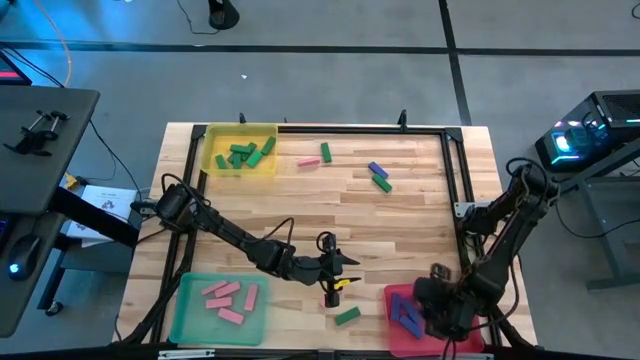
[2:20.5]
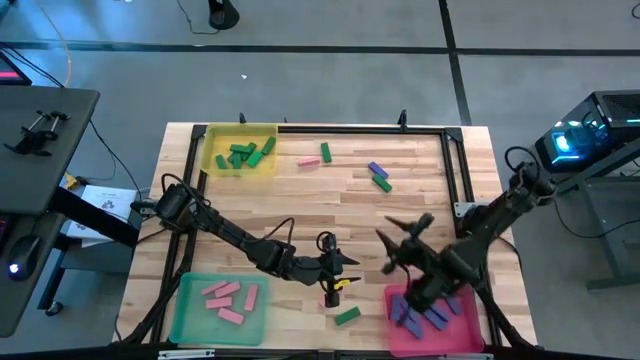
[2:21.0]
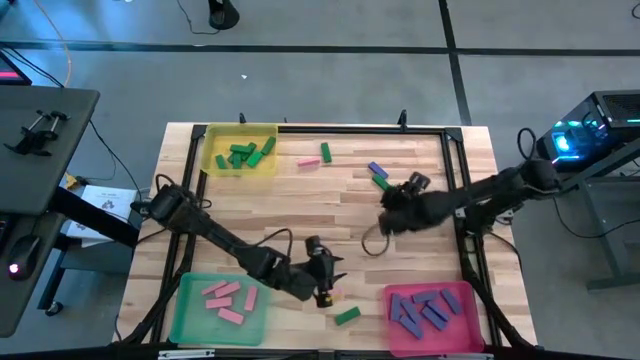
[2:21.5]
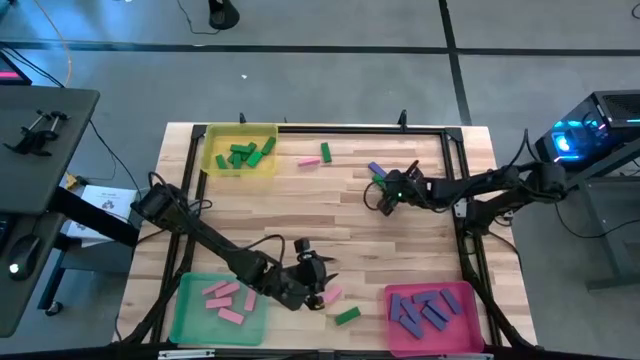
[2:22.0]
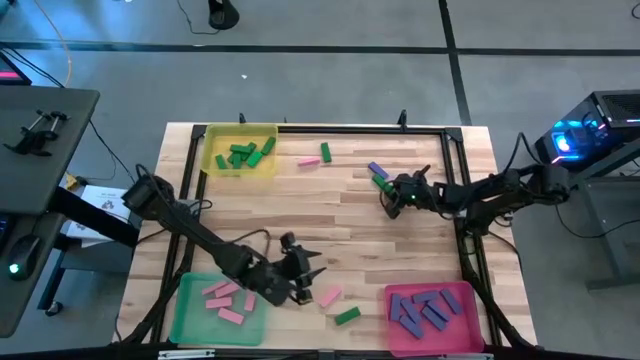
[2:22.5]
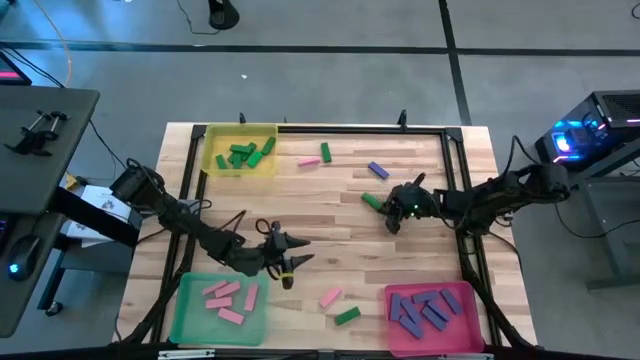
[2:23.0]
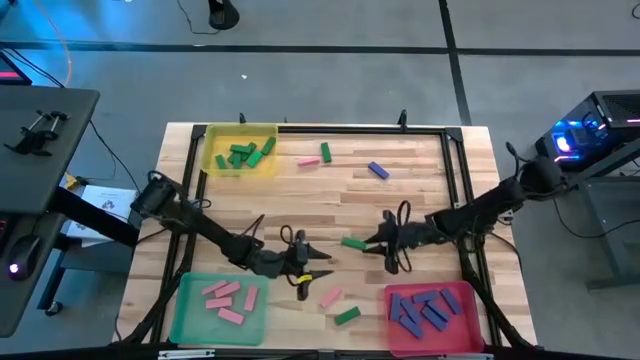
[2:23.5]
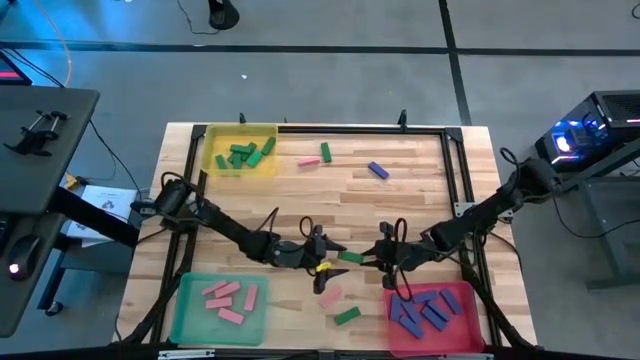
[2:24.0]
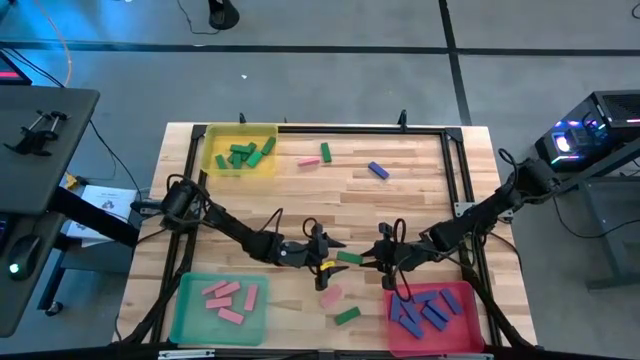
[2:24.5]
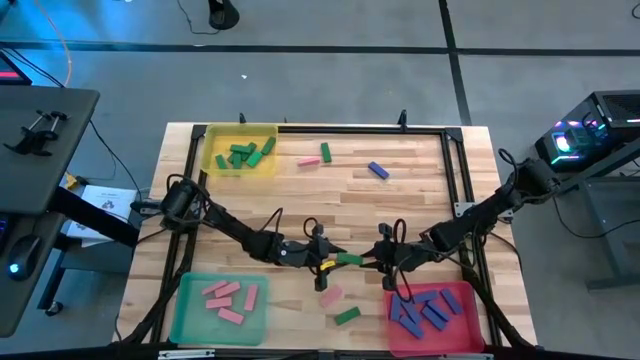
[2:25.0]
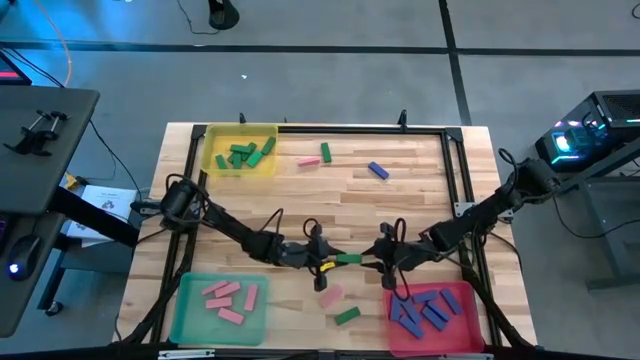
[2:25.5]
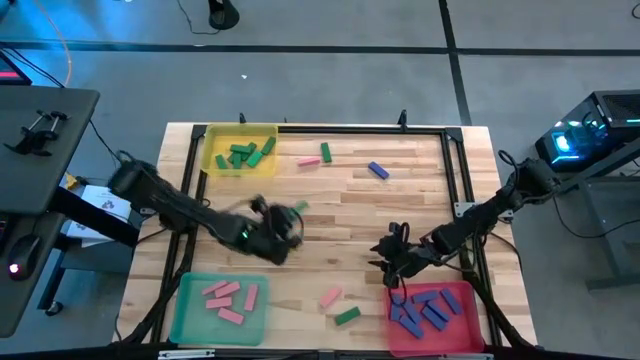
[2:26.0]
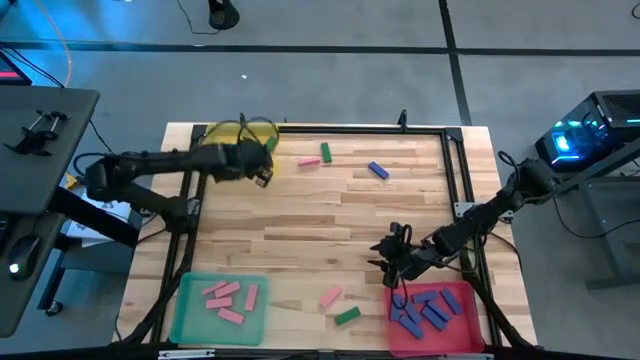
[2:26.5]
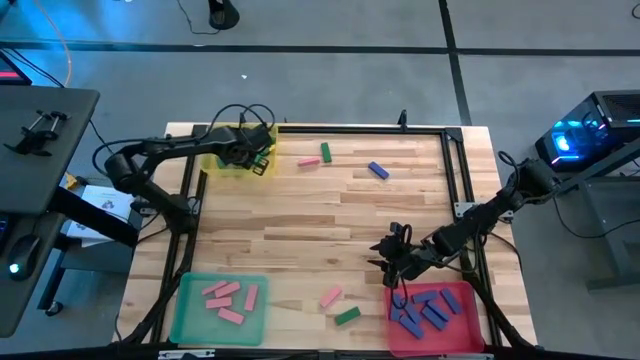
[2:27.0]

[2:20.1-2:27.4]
Task: Sort blocks
Put the green block into the yellow bin

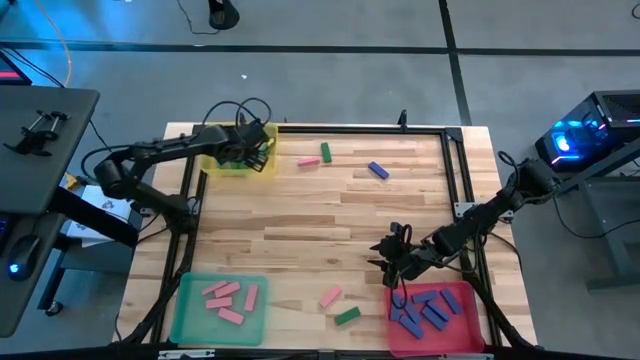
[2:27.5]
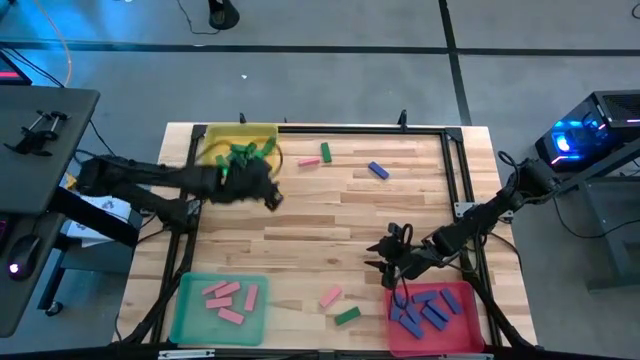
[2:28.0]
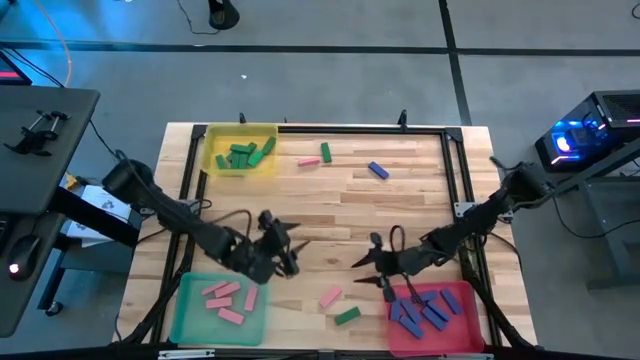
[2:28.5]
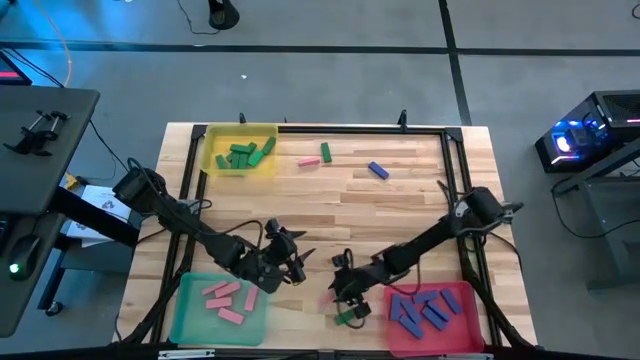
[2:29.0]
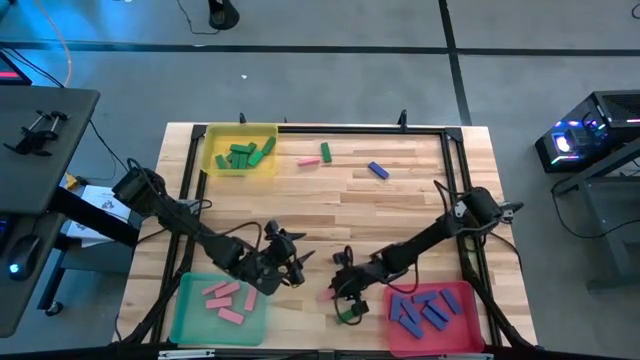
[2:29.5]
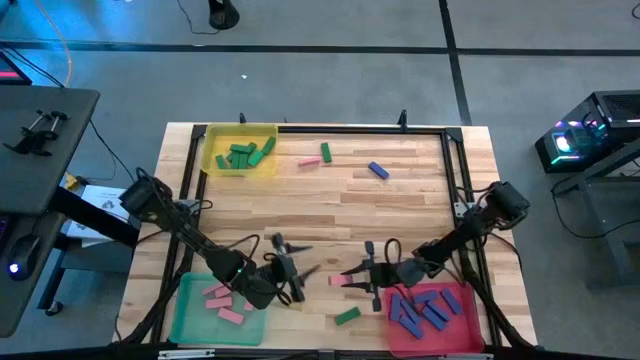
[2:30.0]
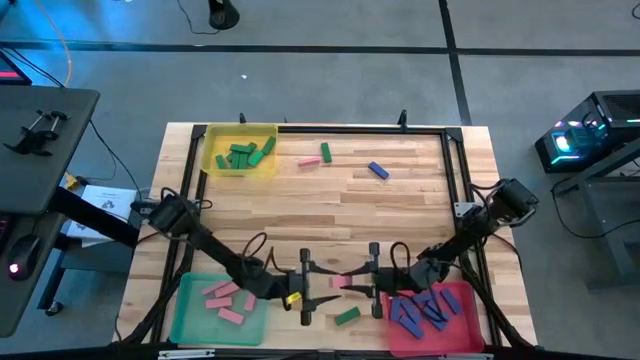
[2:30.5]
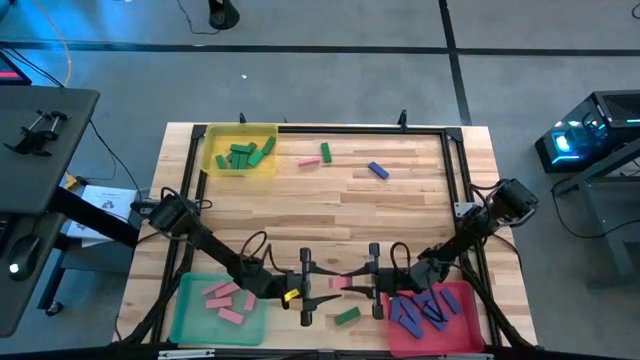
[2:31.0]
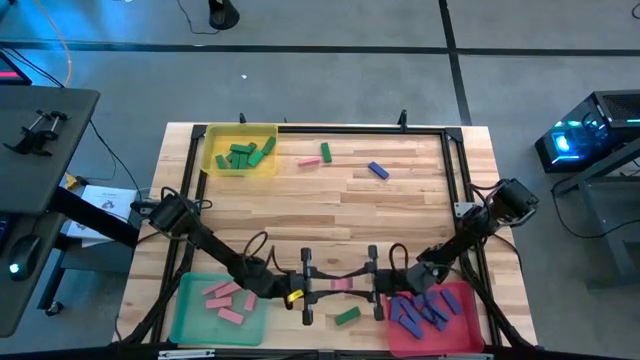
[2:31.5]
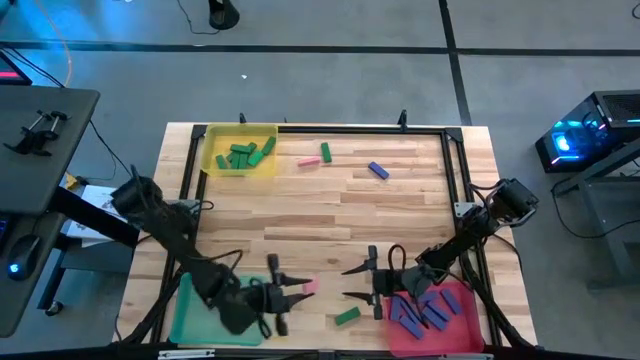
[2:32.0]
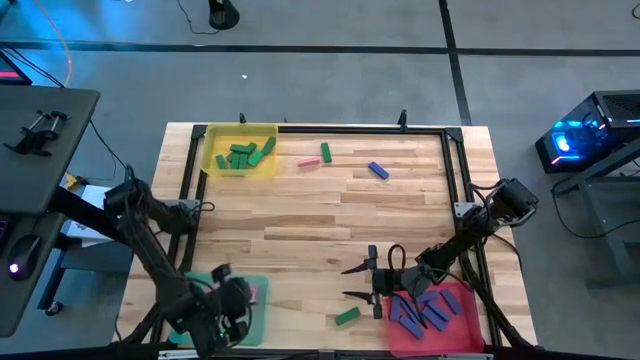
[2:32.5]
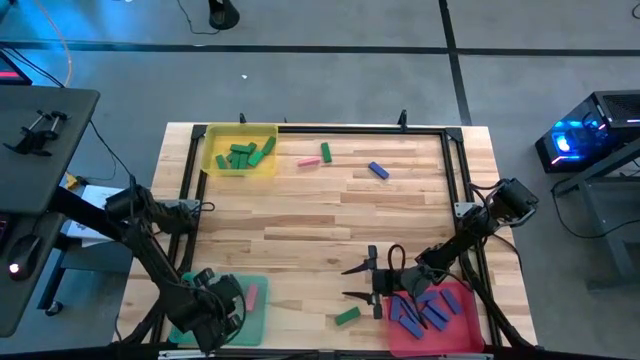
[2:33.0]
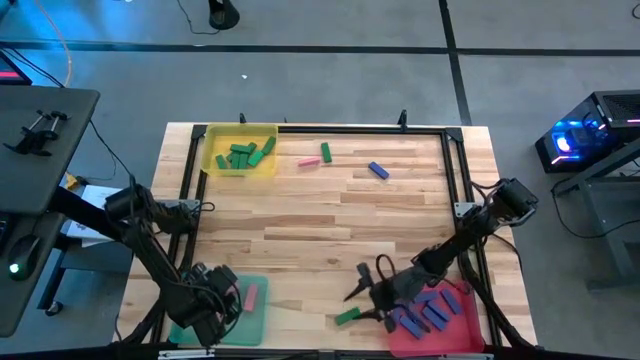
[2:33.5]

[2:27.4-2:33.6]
Put the pink block into the green bin

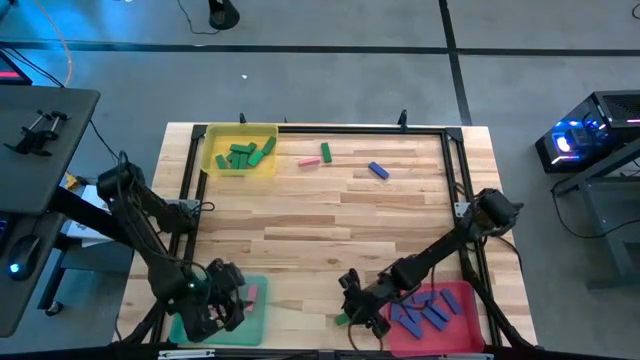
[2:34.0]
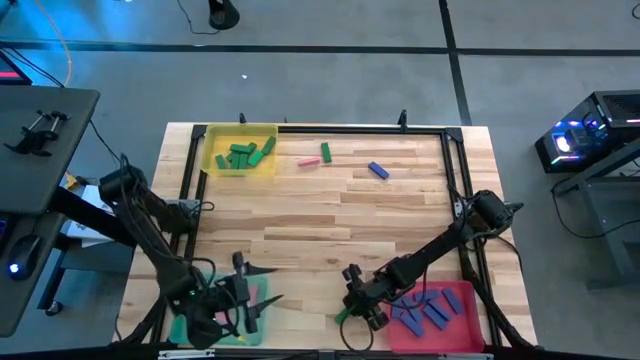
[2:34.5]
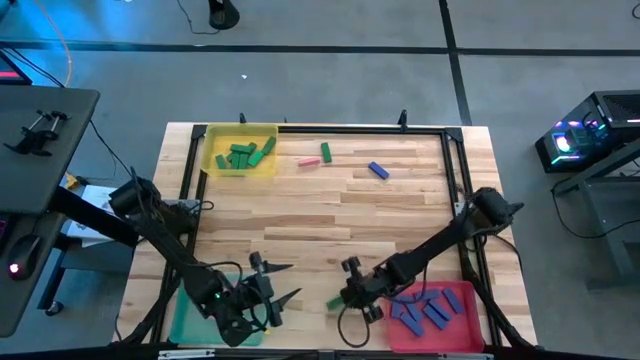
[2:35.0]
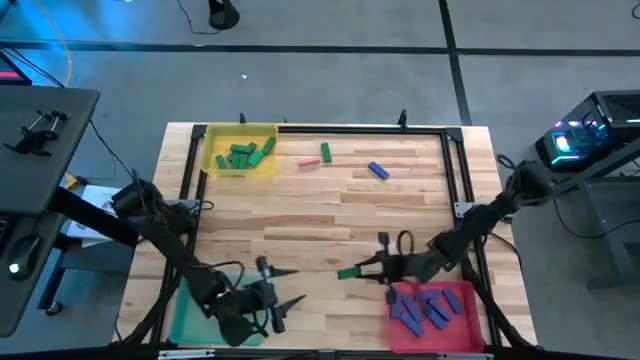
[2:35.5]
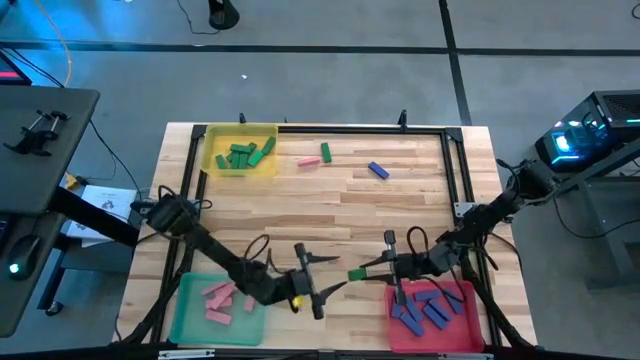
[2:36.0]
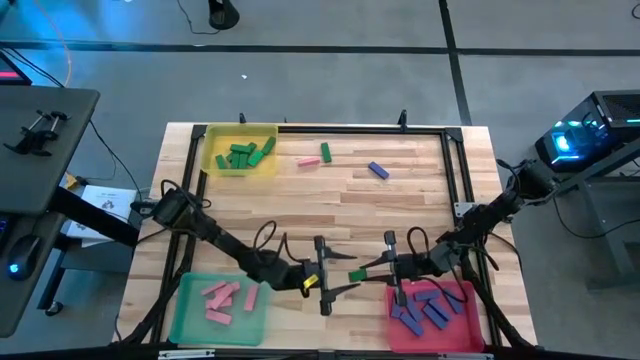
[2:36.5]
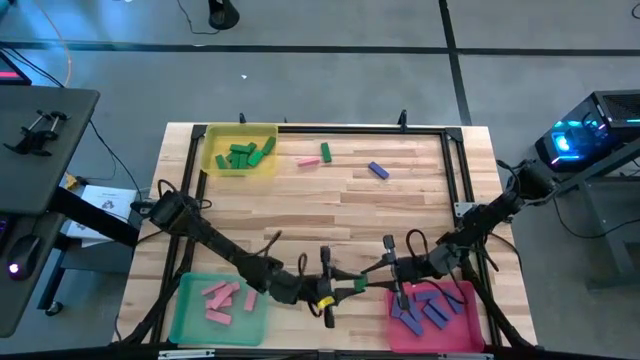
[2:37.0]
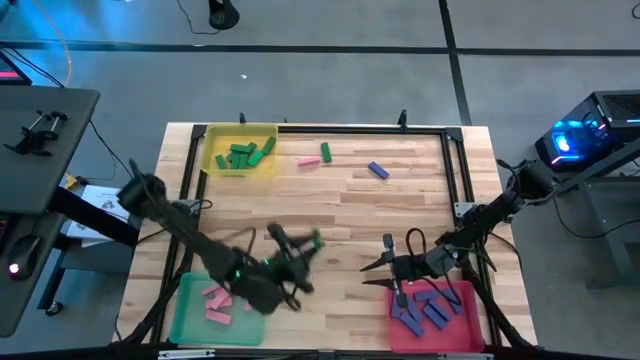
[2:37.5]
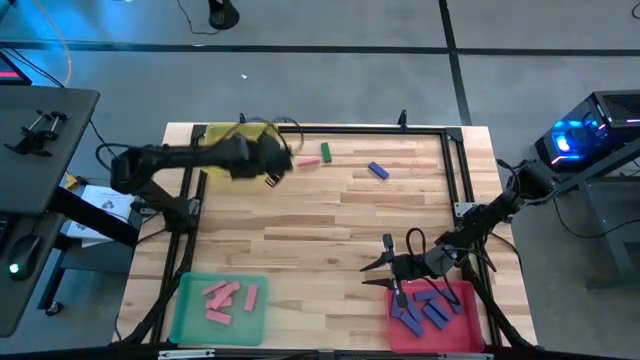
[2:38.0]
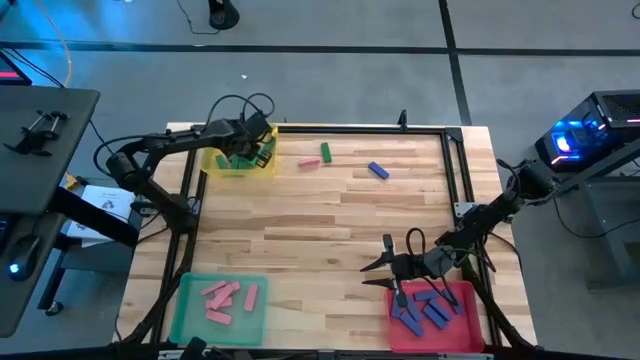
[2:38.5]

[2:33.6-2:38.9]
Put the green block into the yellow bin

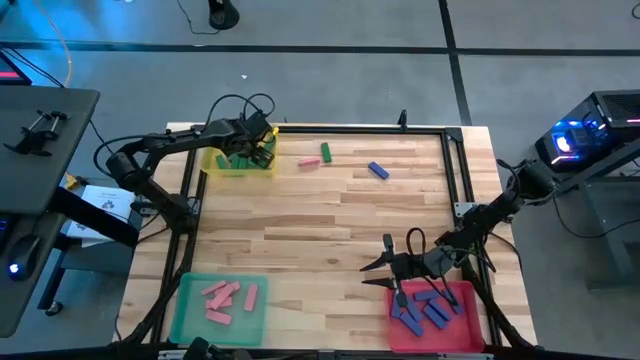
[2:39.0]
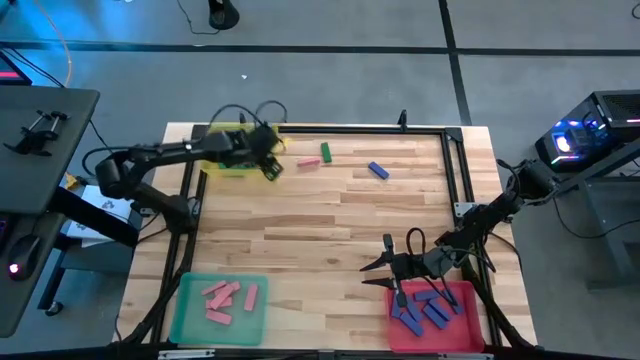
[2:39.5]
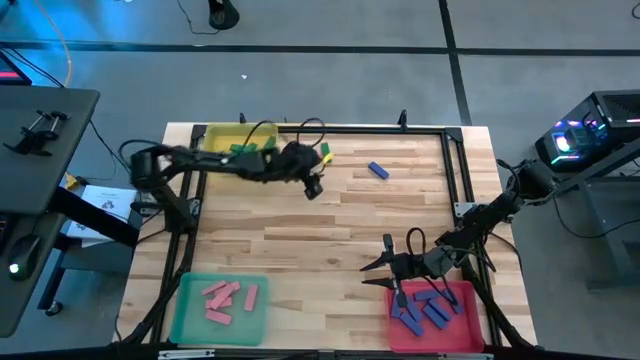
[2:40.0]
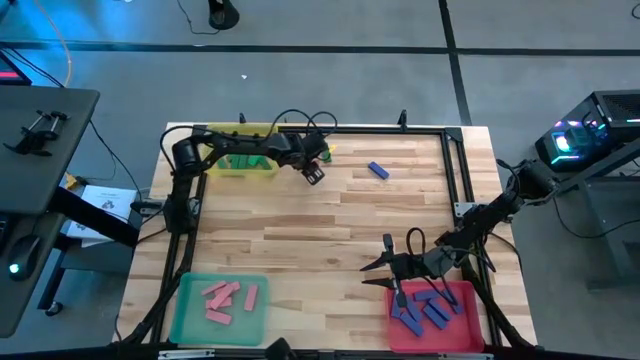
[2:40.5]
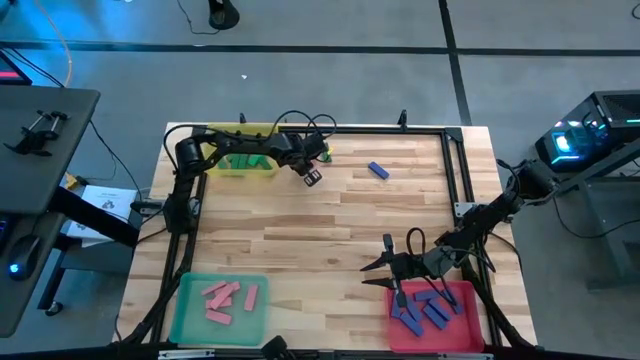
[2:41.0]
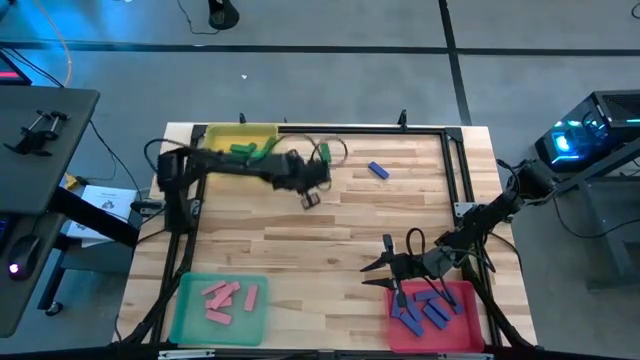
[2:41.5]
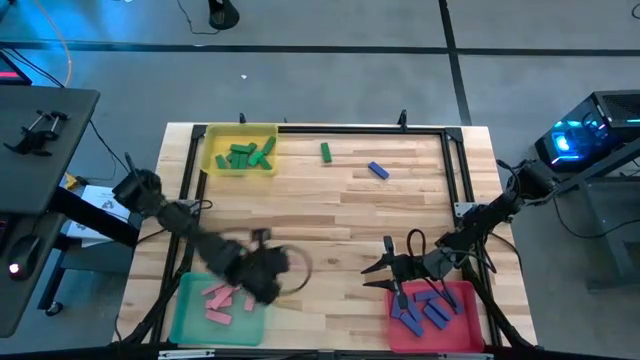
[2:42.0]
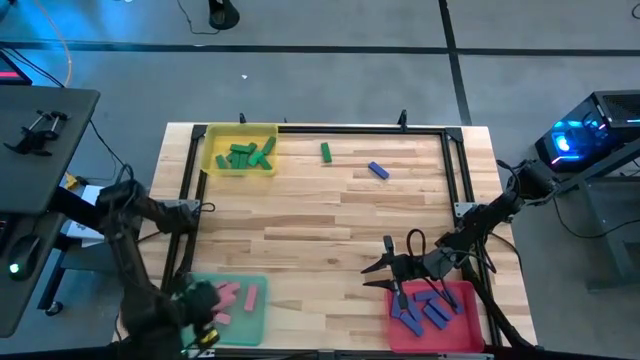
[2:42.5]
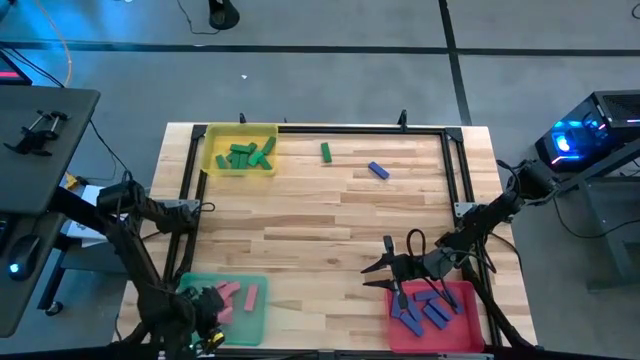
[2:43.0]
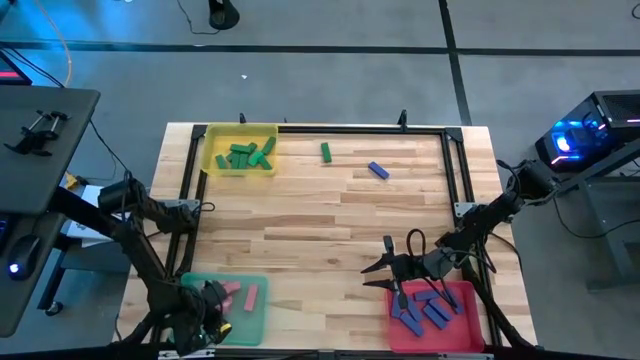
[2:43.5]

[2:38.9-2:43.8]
Put the pink block into the green bin
